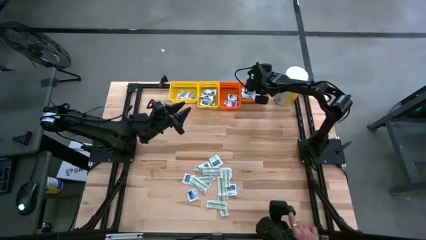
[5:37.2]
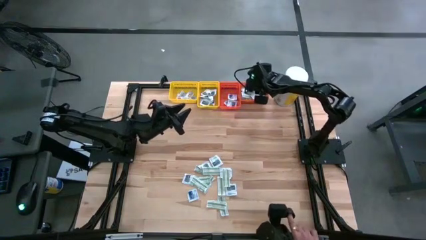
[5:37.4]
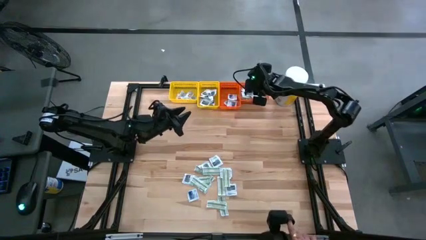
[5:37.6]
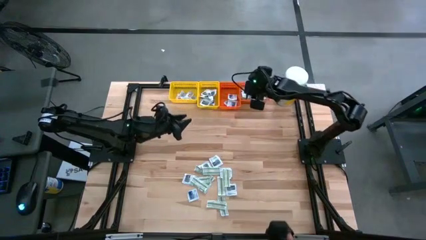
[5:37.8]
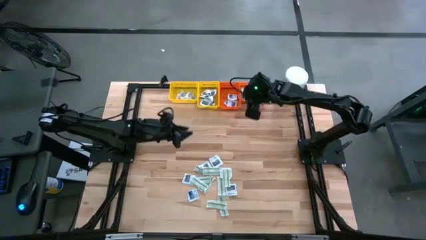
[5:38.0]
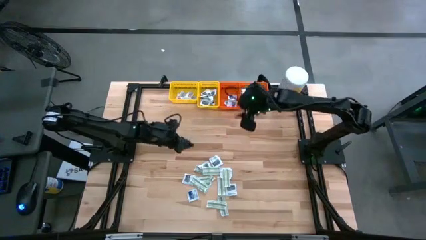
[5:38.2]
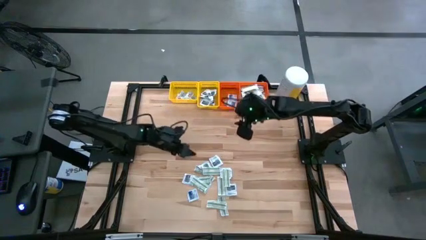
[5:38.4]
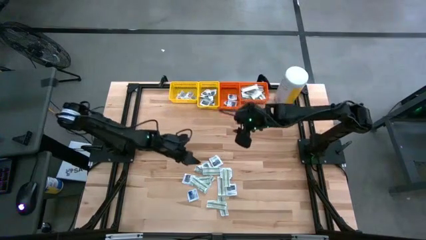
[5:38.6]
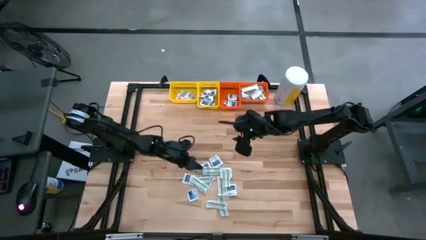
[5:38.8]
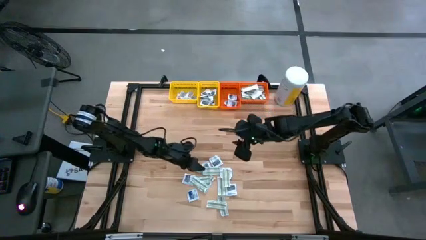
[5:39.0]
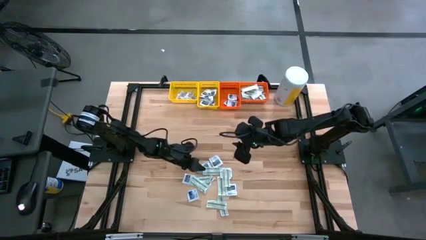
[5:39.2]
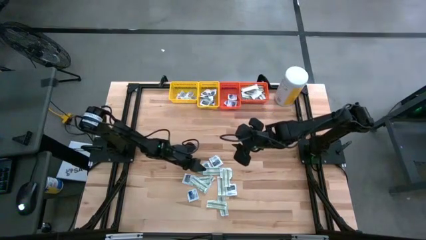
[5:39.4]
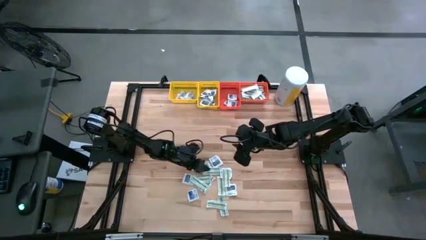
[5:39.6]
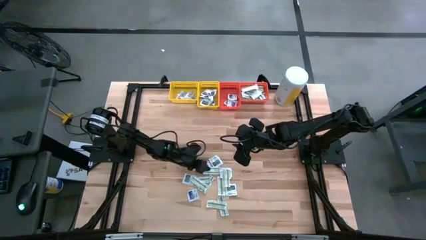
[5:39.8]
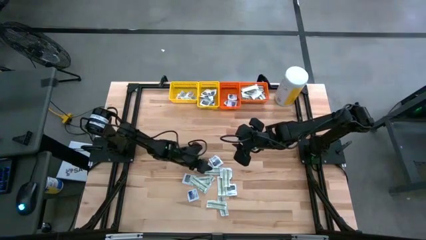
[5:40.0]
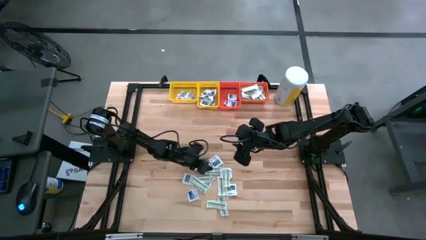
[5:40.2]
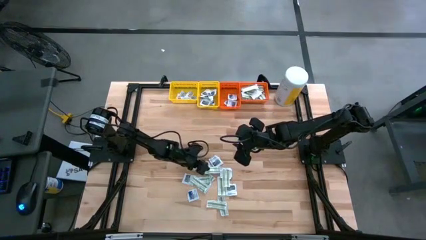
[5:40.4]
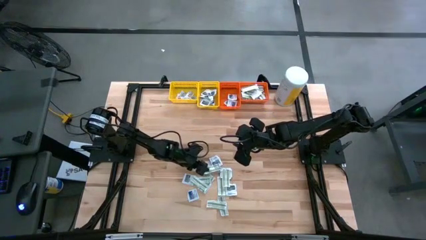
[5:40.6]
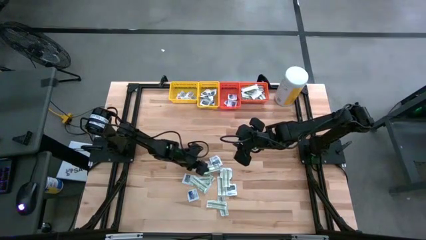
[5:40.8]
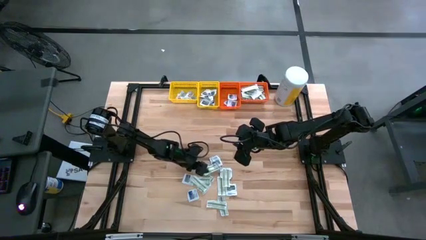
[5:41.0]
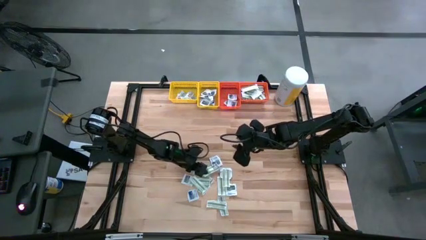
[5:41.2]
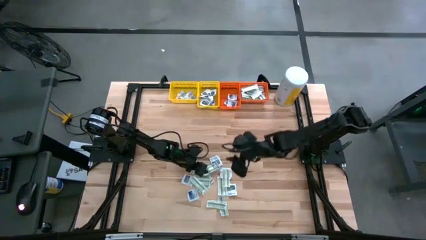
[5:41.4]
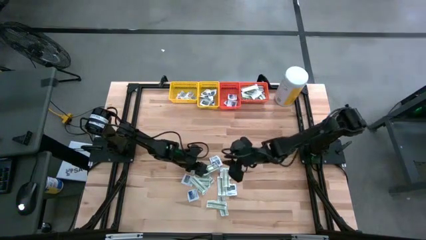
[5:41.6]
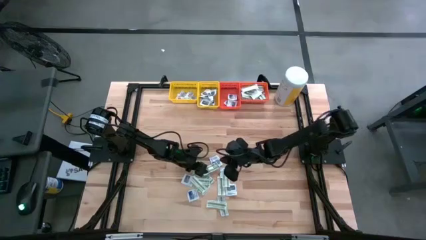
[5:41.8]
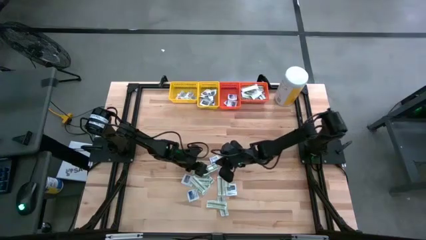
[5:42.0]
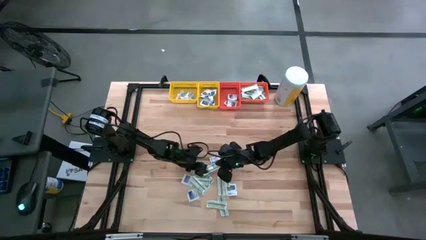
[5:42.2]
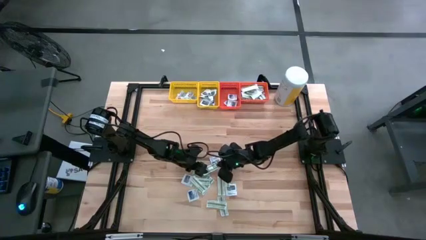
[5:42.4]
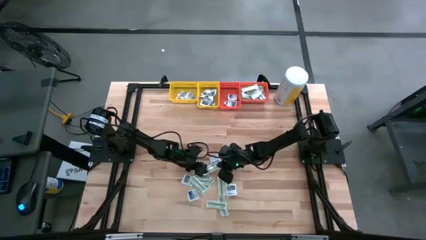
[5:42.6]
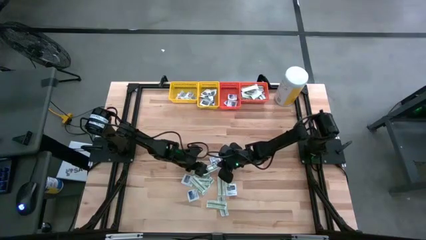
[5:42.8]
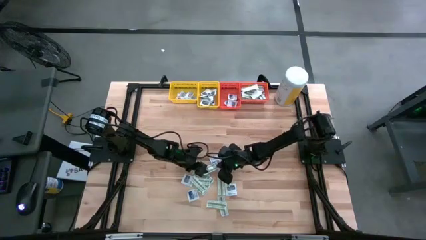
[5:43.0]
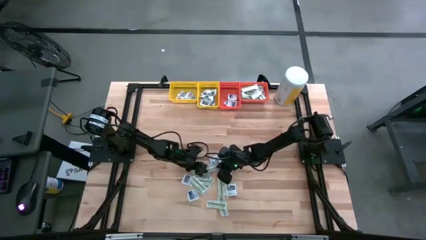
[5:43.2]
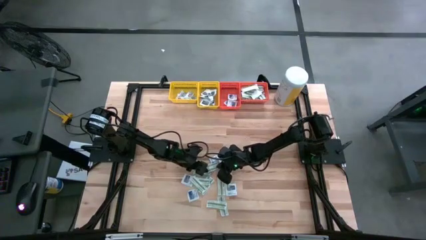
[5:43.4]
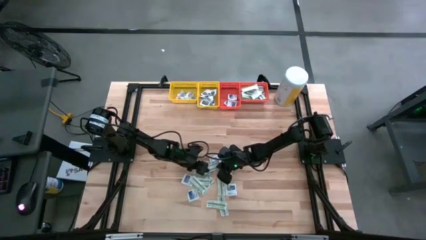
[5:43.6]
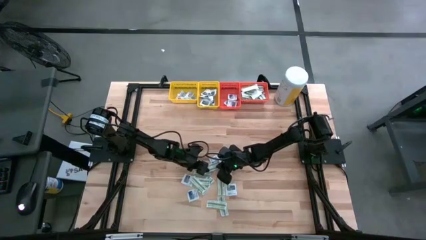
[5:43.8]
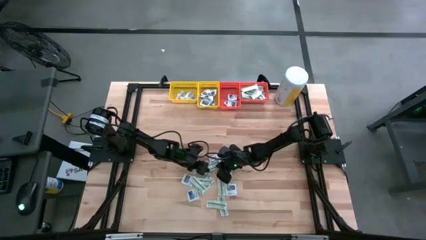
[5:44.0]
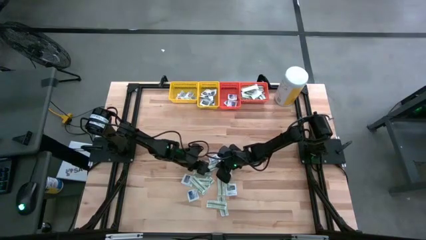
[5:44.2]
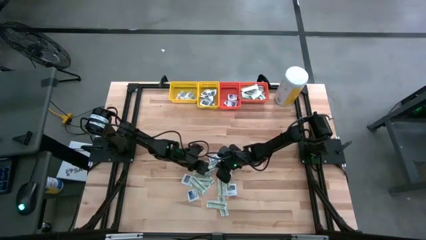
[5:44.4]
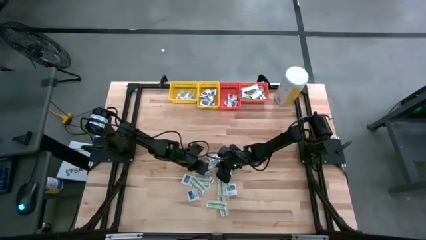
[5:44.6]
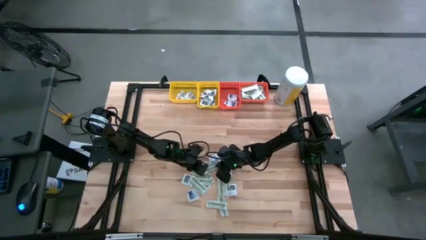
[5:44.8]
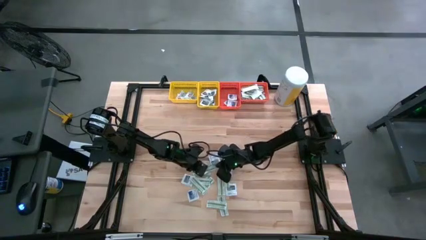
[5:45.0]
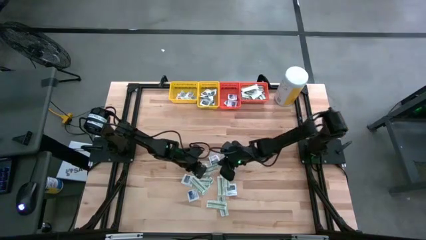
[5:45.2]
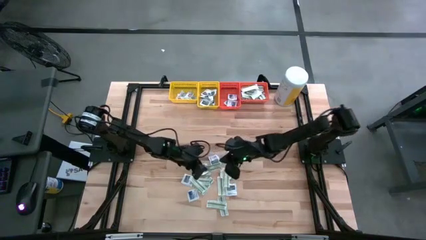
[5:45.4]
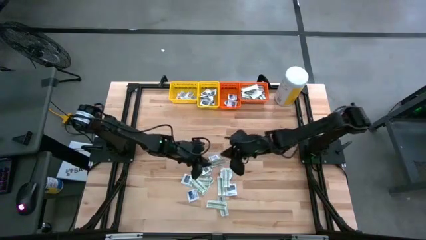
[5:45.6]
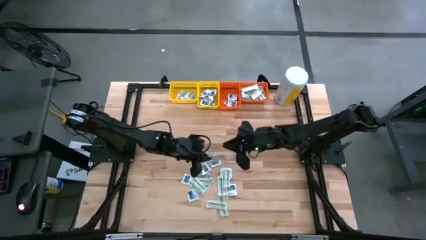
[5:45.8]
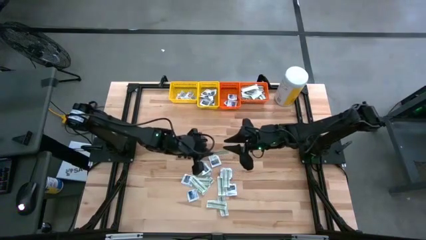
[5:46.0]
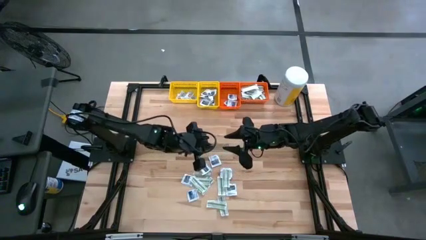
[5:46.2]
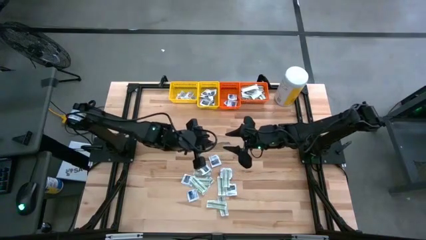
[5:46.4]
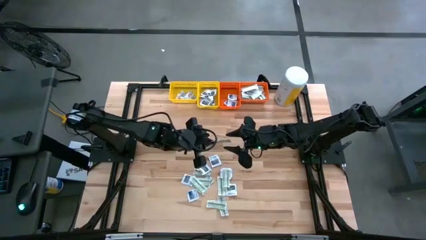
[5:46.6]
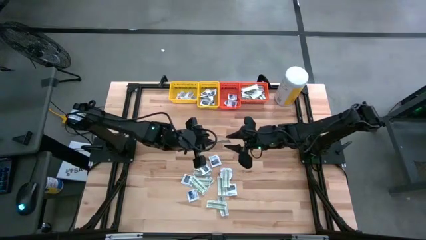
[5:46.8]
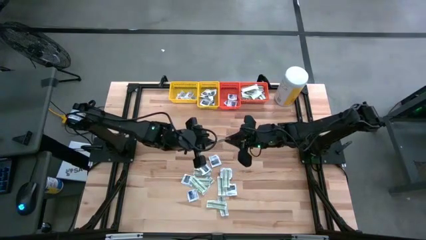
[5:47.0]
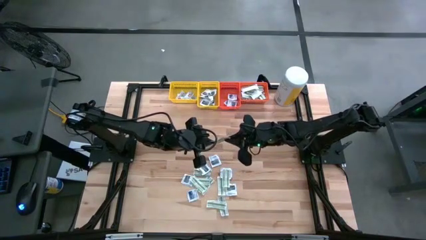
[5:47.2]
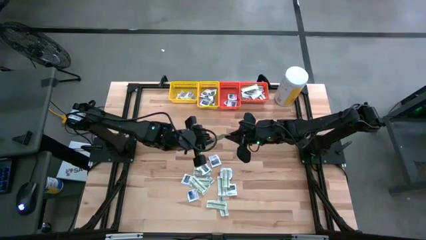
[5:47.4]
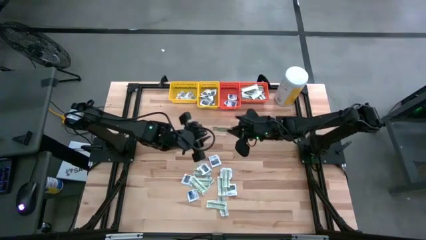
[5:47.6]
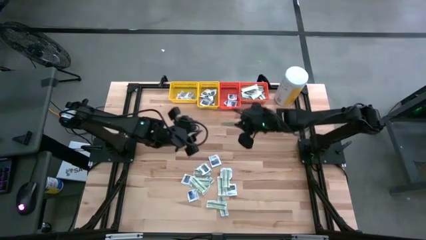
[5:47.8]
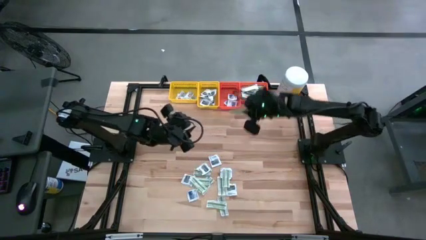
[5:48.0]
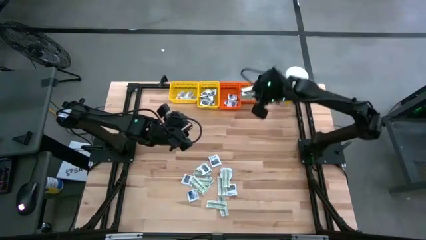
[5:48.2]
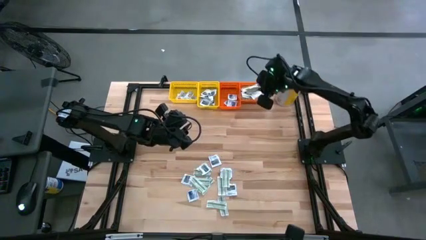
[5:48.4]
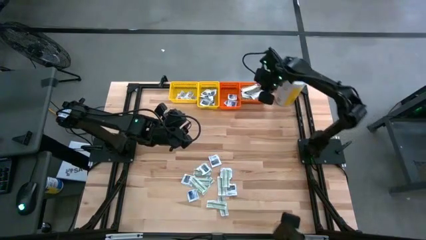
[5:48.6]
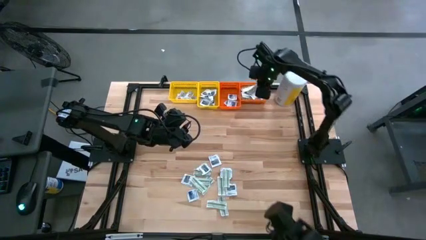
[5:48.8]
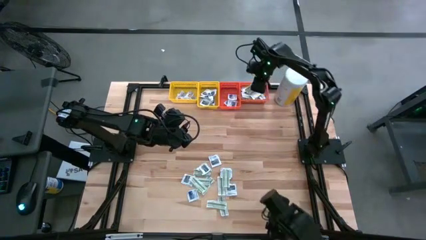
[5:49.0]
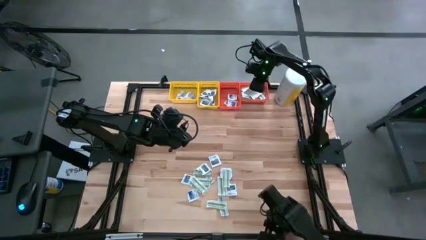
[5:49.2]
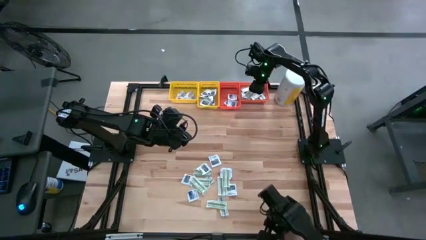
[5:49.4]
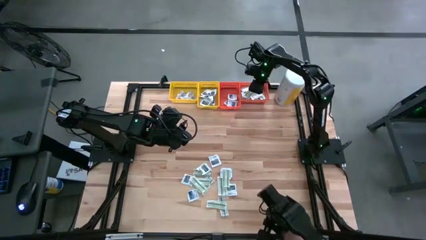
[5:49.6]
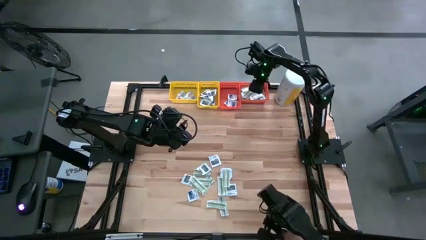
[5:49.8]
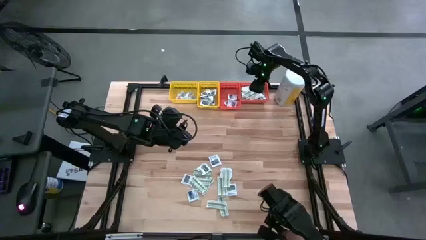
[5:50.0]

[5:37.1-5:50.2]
Task: Pick & Place First Aid Supplies
Put the green pad into the right orange bin

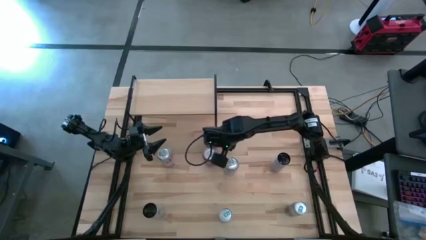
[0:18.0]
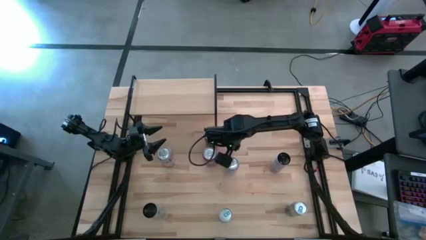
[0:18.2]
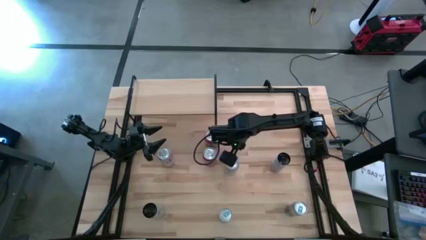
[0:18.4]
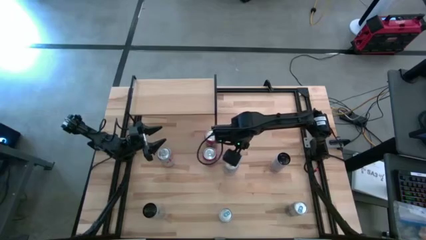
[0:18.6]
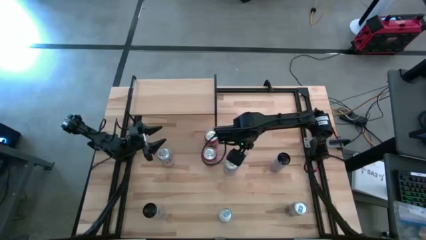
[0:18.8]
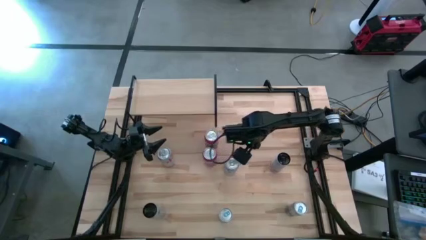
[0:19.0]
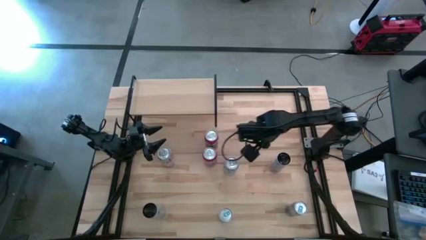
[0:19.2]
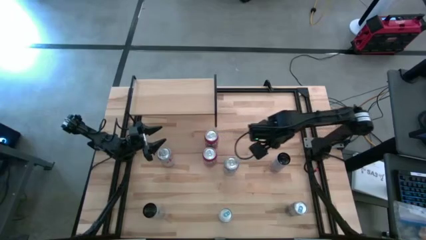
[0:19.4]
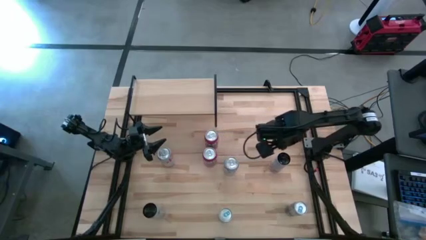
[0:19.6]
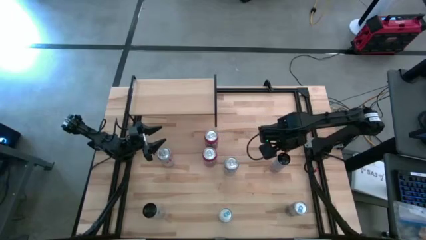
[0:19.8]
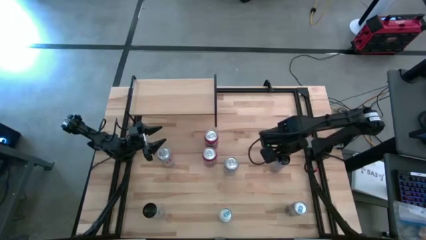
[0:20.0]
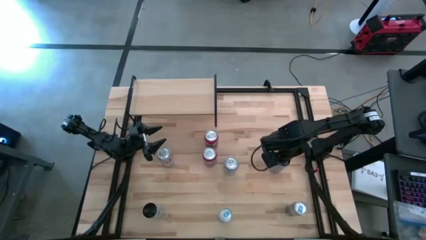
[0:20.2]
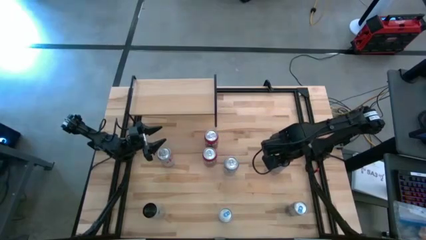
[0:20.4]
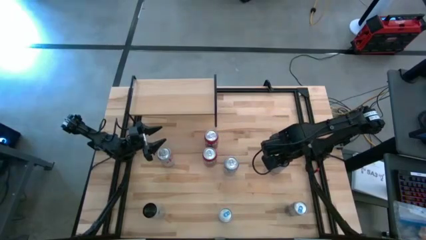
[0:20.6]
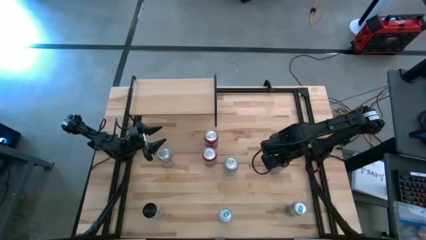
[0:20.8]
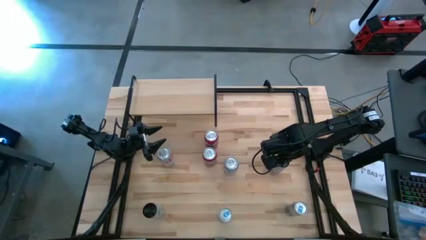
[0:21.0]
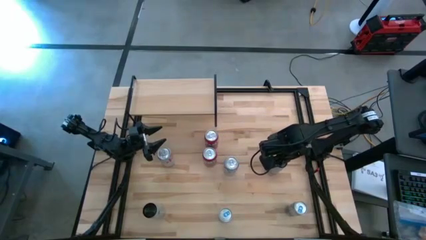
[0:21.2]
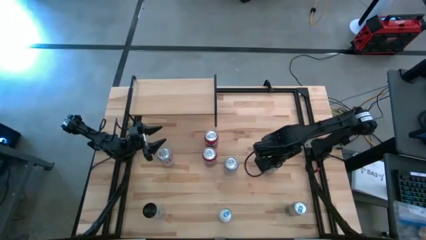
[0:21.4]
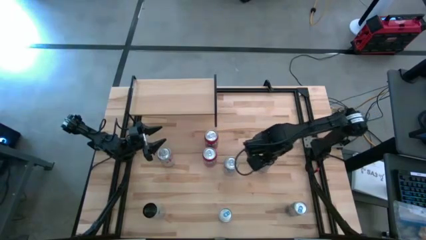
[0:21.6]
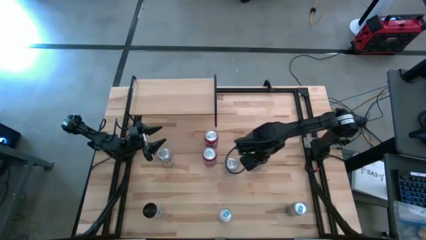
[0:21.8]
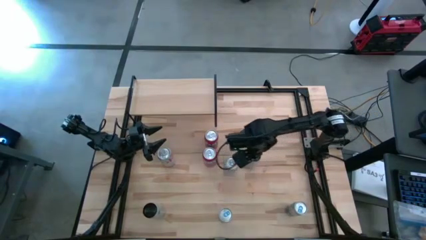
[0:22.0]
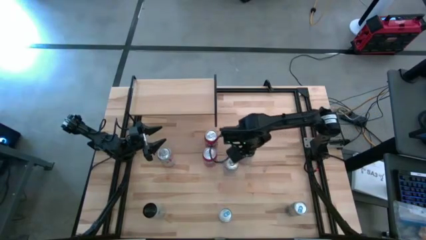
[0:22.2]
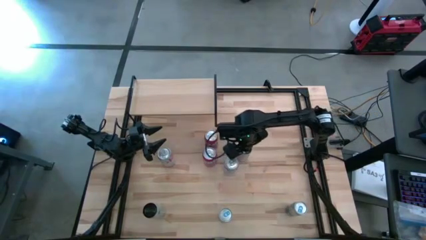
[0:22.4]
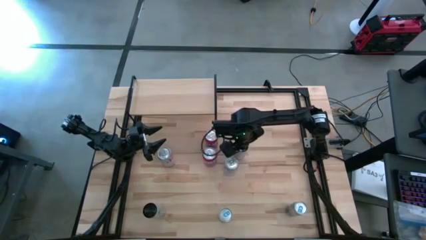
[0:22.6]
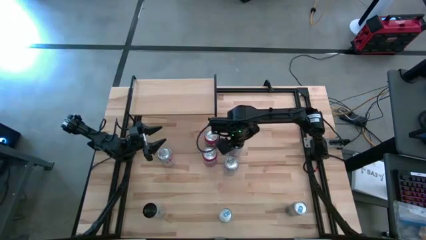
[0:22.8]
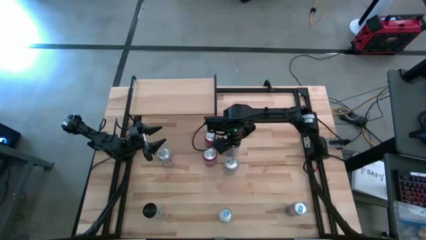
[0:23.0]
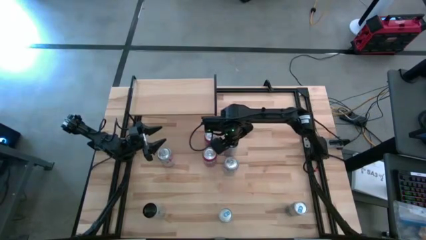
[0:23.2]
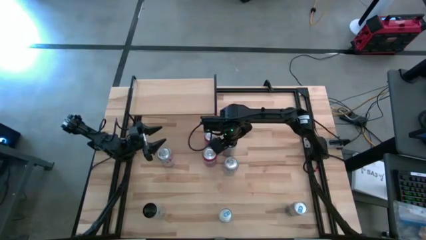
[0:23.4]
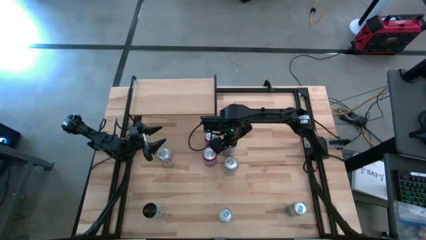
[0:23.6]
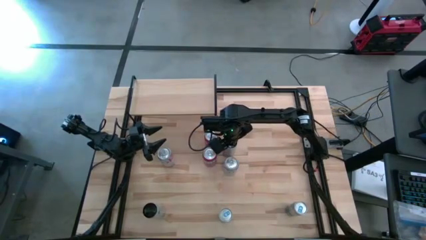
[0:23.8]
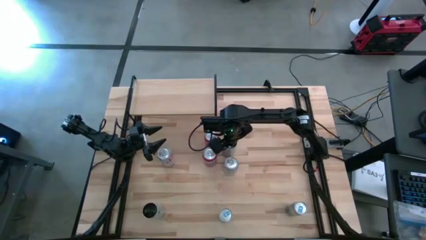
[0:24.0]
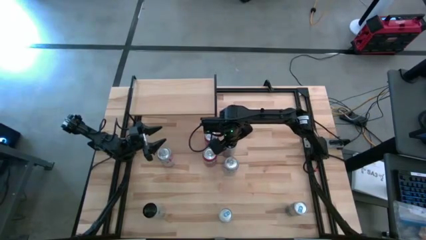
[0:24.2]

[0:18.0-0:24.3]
Task: Place canned beverage on shelf
Move the top white pink soda can beside the orange soda can
